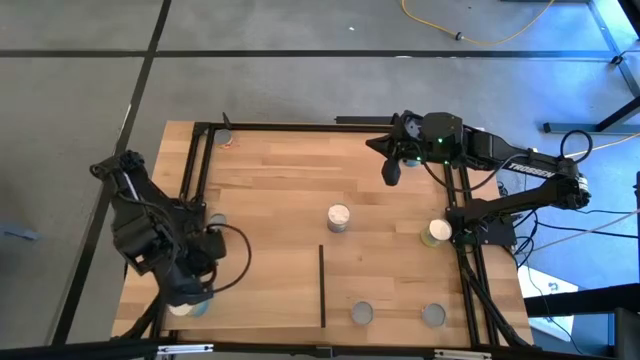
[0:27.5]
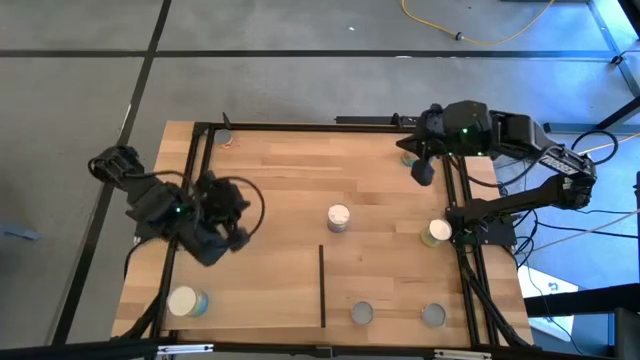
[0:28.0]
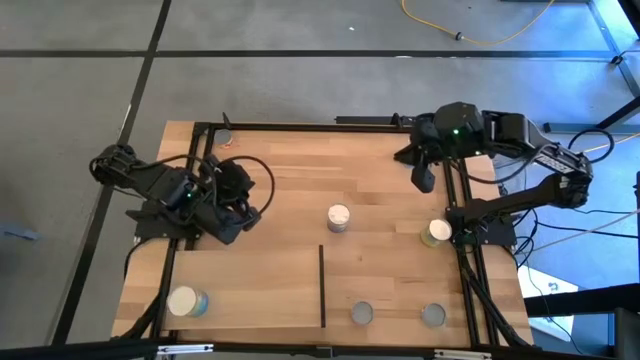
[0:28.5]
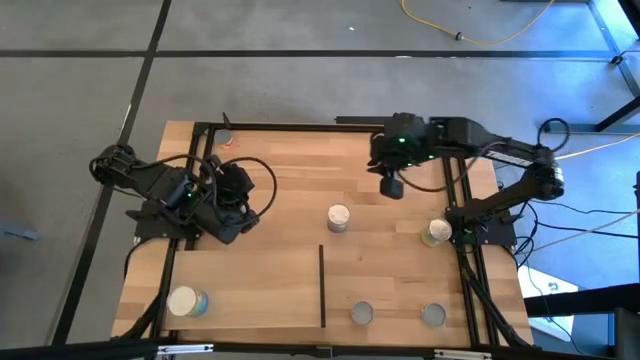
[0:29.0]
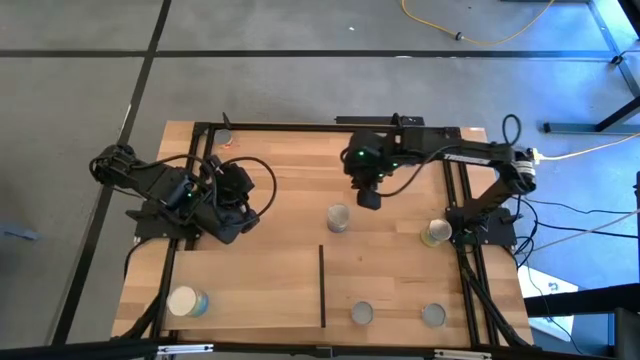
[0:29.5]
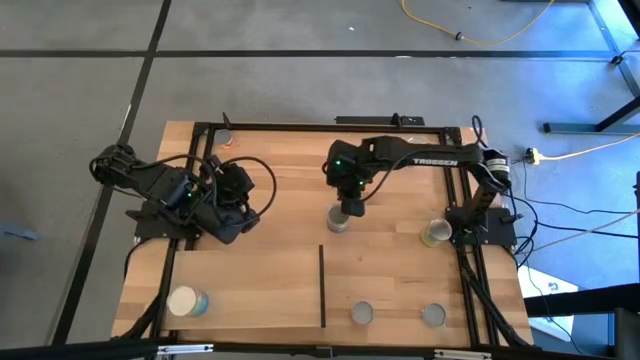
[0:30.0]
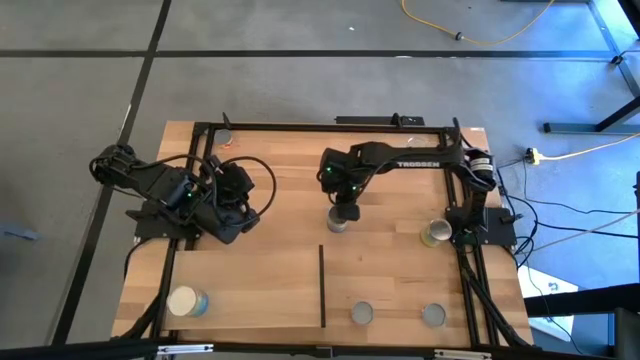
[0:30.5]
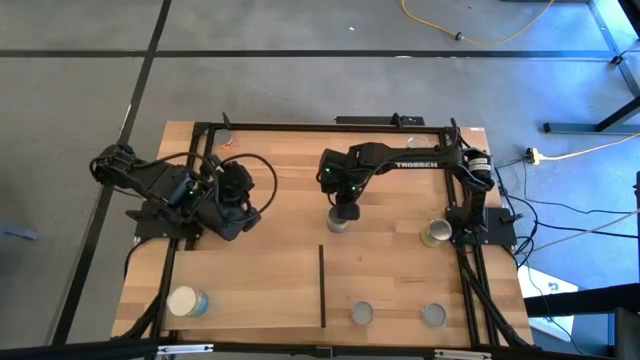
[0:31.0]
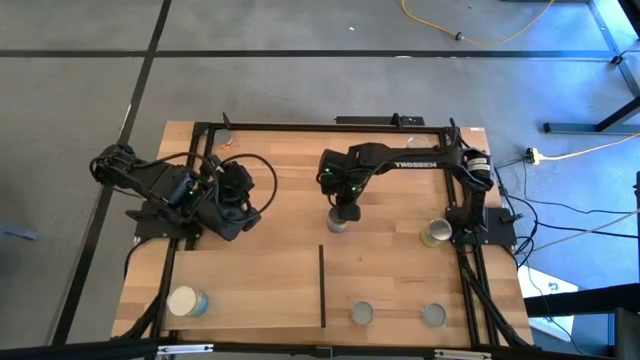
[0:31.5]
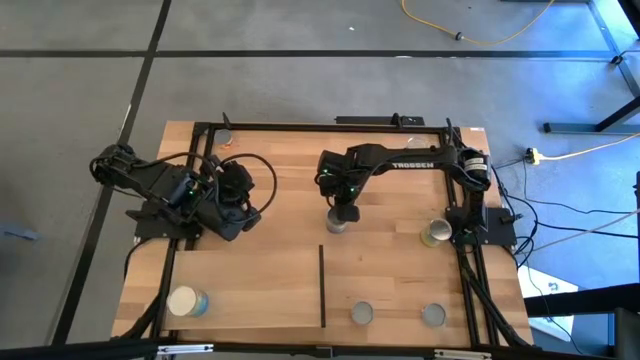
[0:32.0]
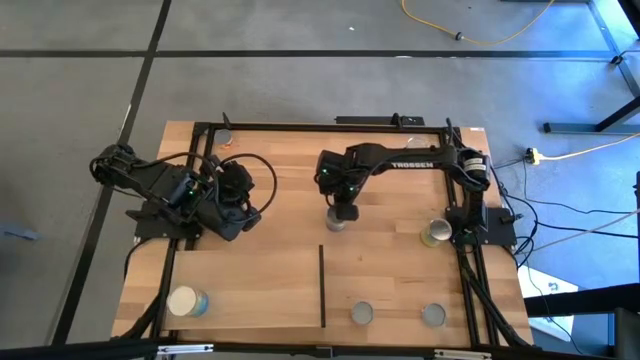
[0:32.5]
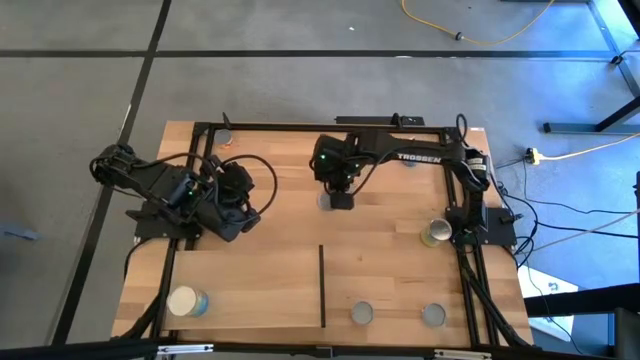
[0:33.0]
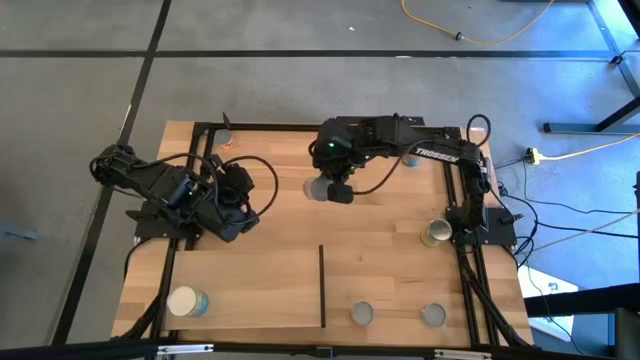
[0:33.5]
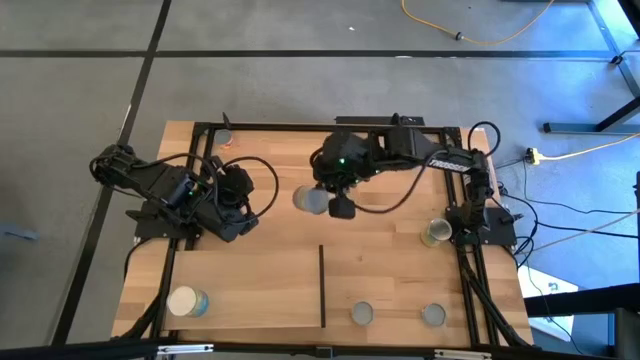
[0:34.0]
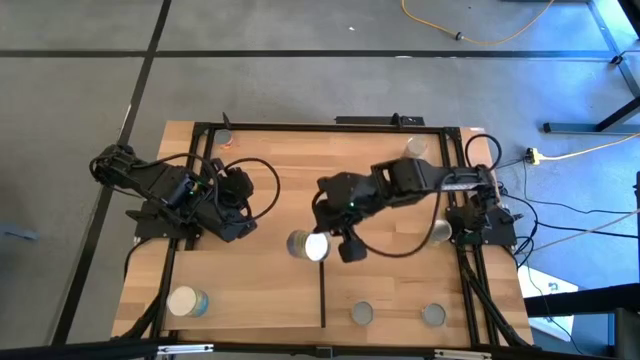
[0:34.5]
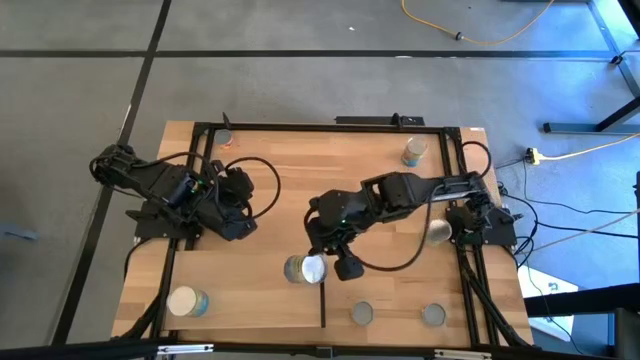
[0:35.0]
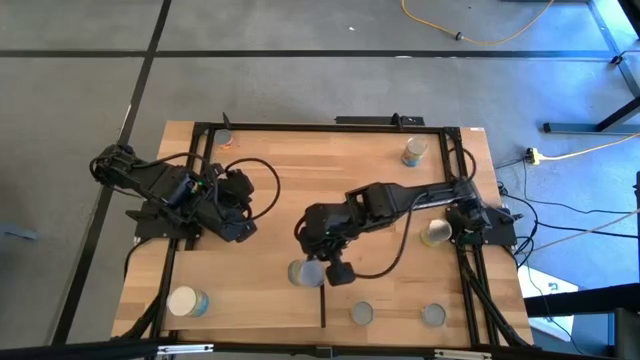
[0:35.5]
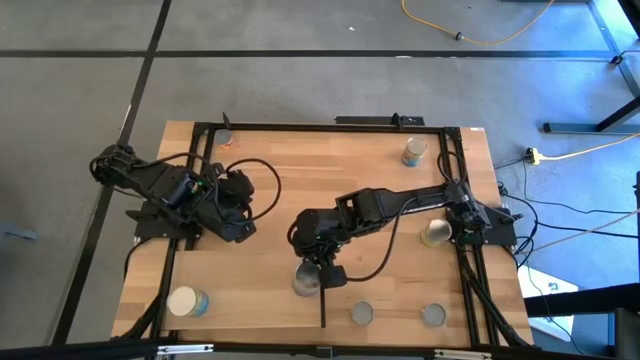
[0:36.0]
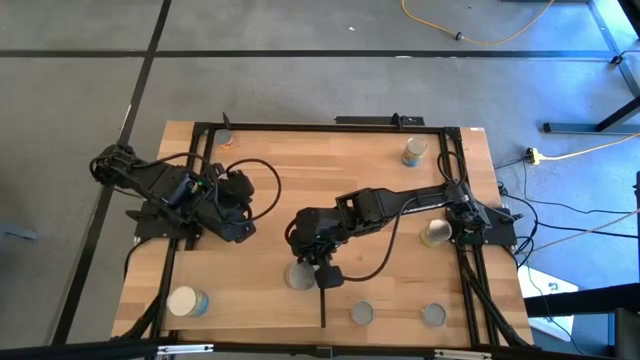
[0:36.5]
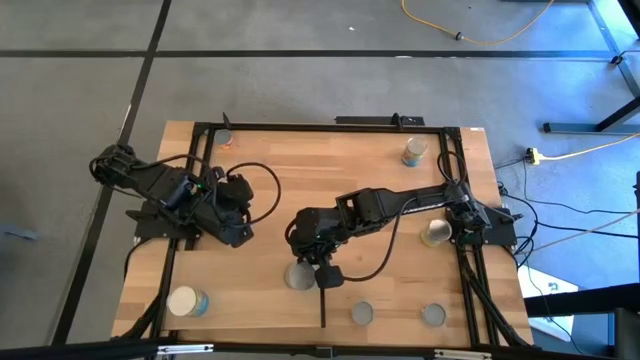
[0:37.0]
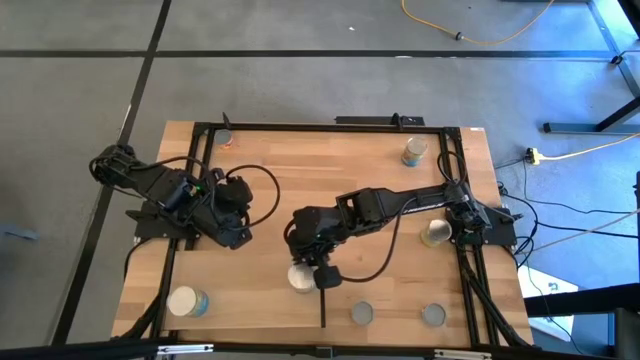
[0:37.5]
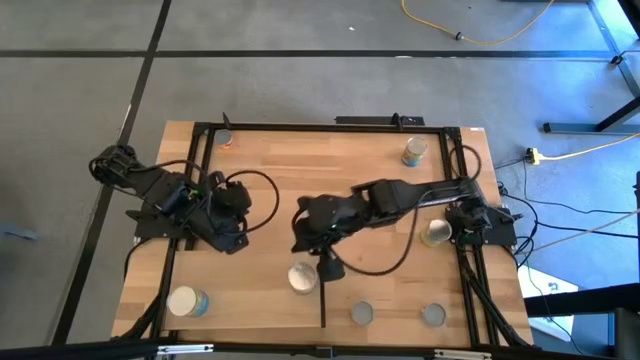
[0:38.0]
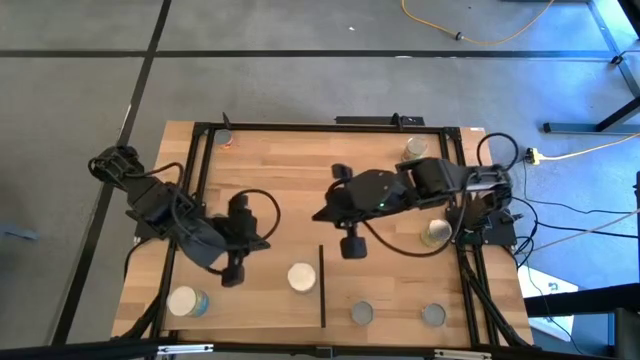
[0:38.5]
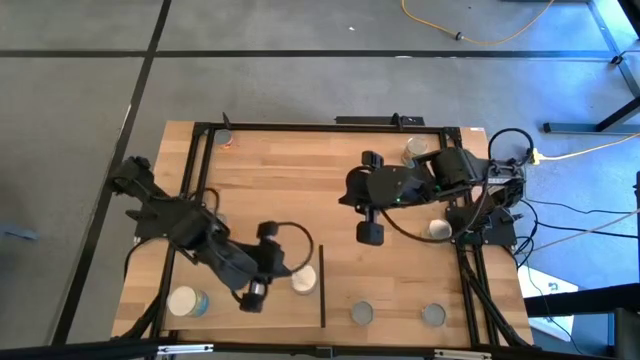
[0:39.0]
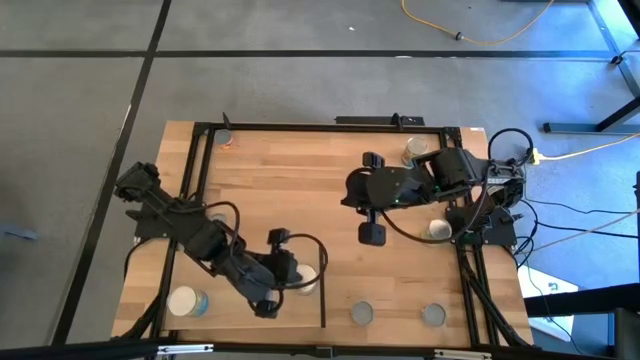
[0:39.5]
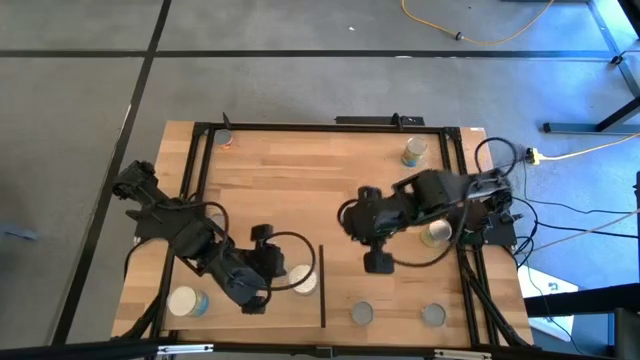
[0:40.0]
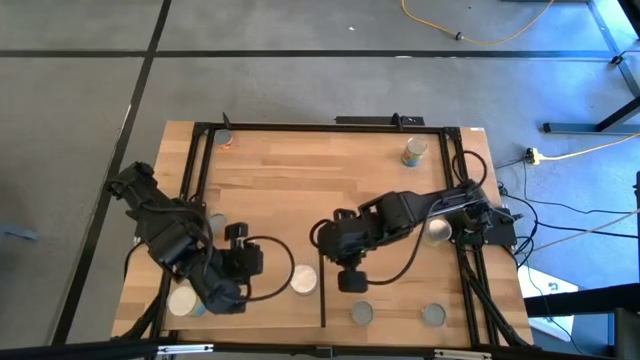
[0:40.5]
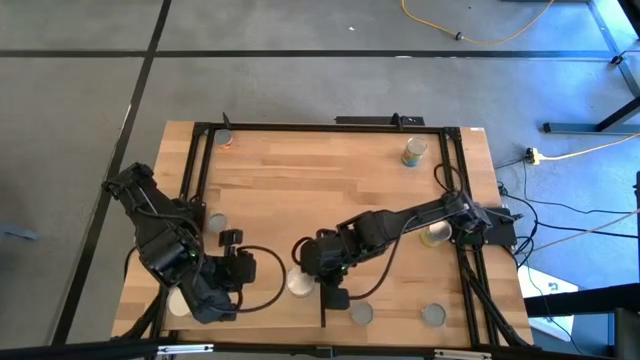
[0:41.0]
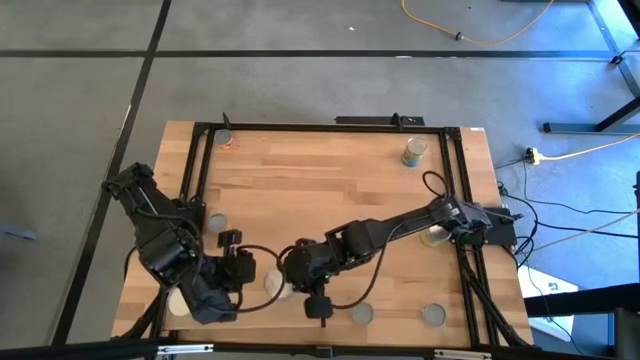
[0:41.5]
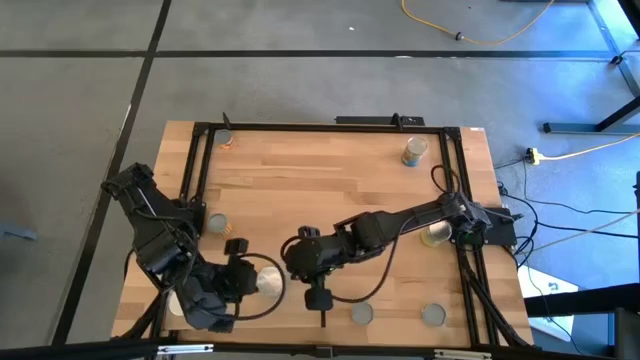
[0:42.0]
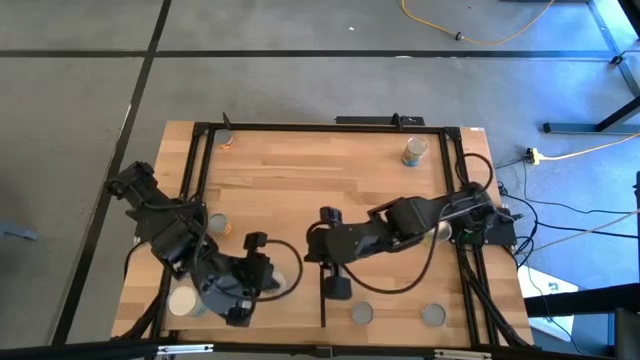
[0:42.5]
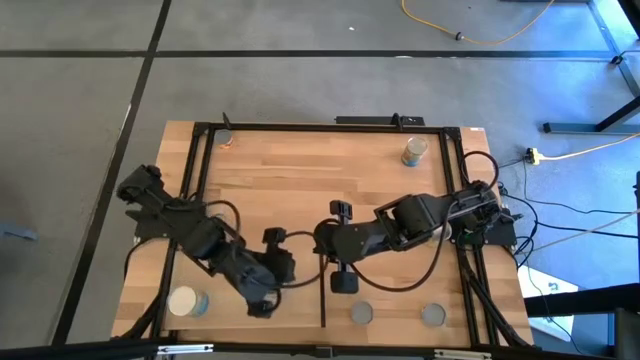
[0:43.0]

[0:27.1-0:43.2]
Task: Pick and place cans onto a shelf
Put the canned peas on the shelf

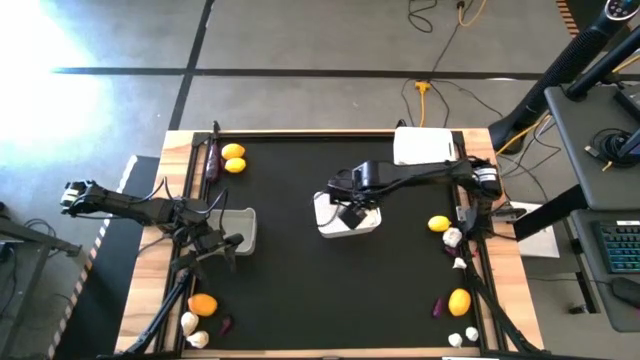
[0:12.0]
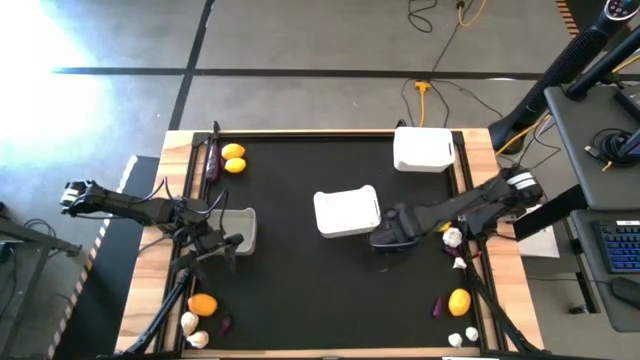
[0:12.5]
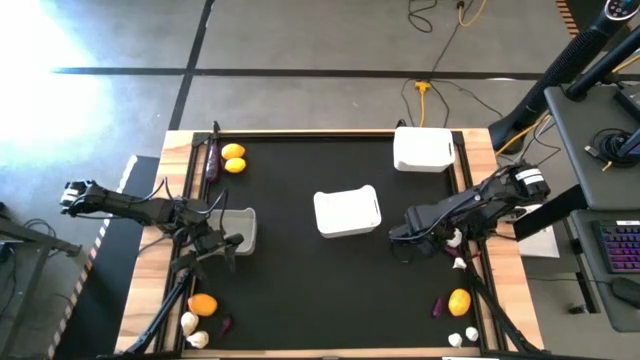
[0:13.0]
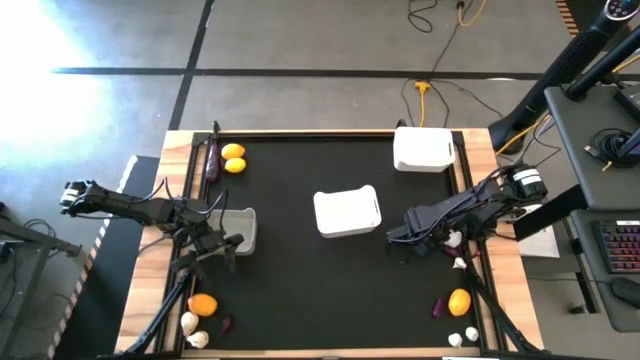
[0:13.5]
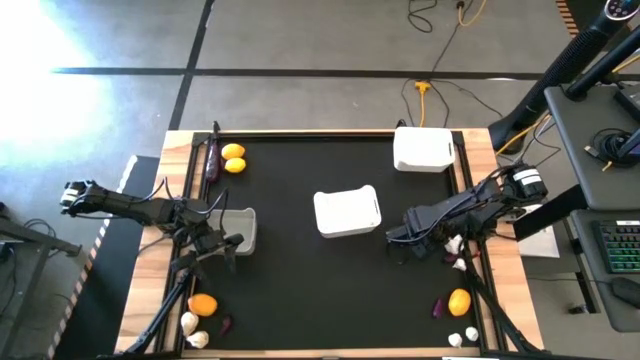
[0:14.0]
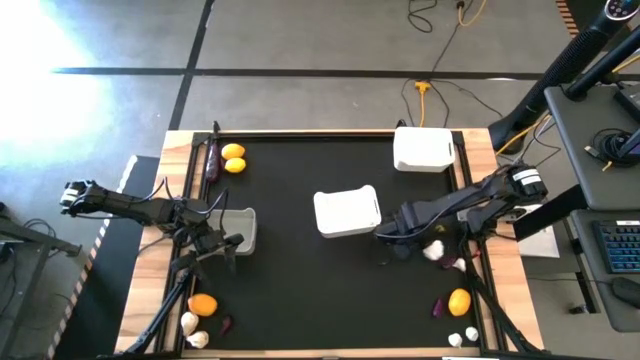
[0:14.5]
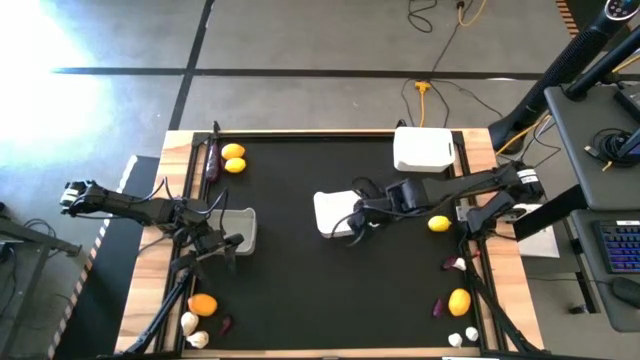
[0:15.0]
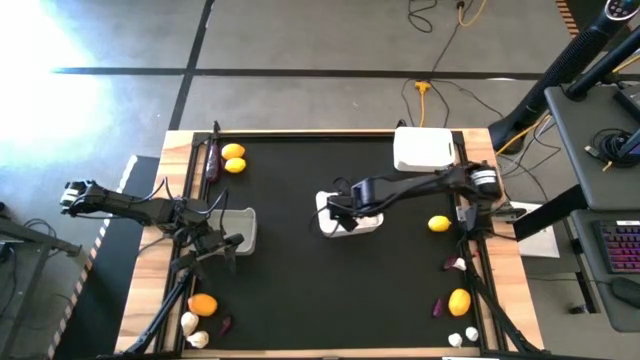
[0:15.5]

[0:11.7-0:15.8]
Task: Sort produce into baskets
Put the white garlic into the bottom white bin
